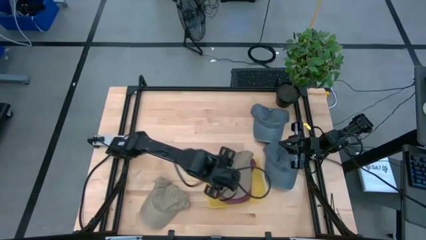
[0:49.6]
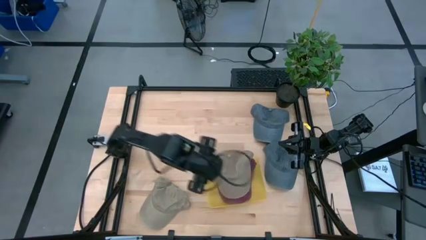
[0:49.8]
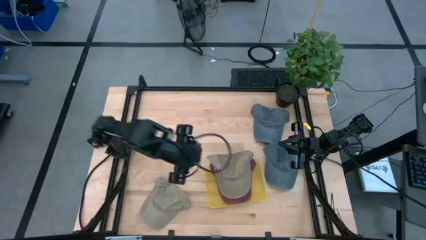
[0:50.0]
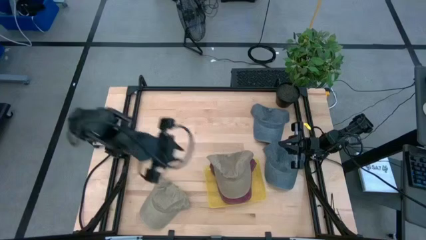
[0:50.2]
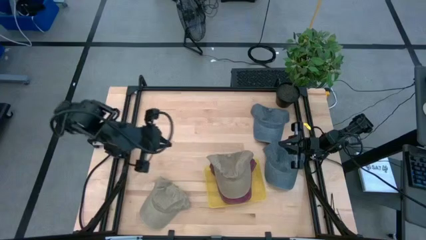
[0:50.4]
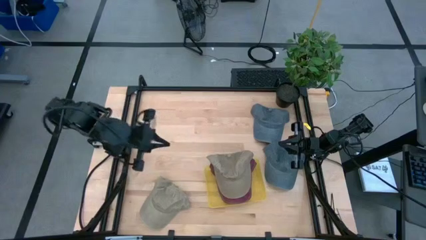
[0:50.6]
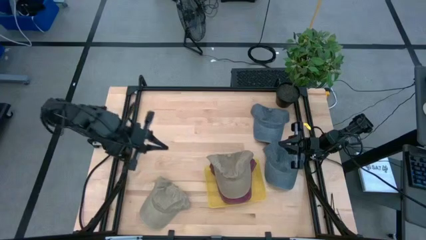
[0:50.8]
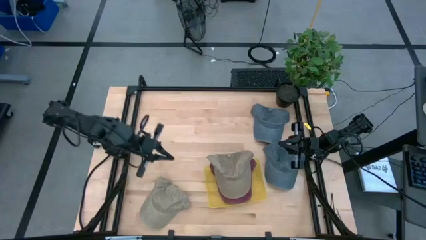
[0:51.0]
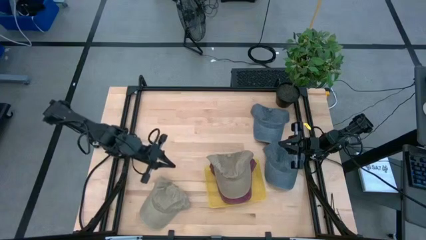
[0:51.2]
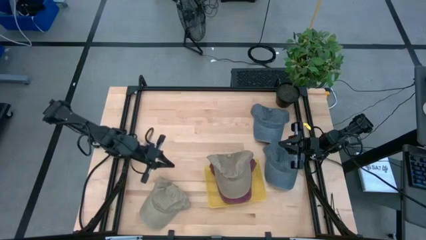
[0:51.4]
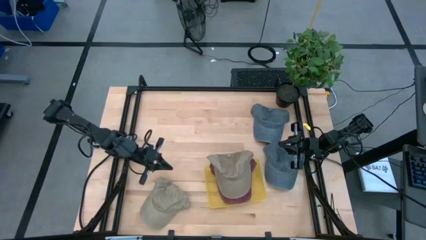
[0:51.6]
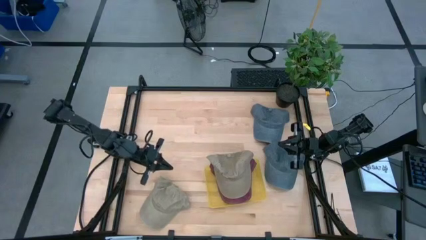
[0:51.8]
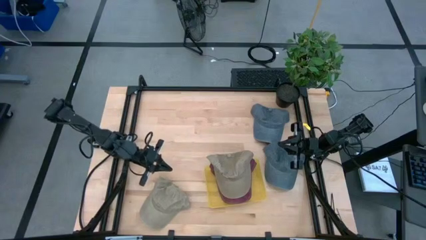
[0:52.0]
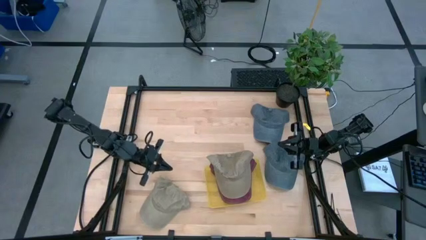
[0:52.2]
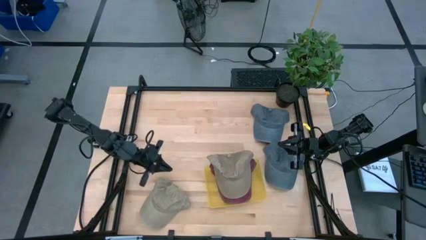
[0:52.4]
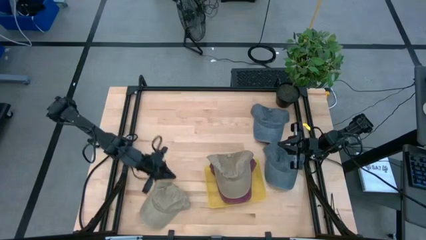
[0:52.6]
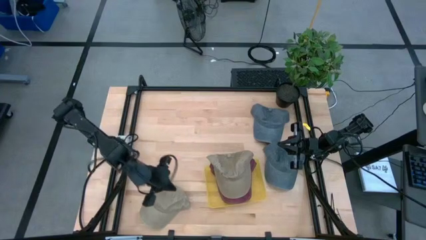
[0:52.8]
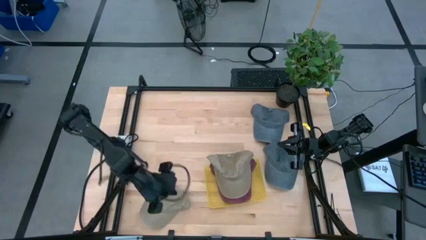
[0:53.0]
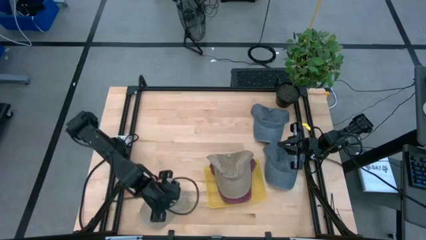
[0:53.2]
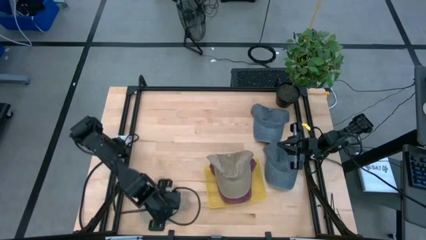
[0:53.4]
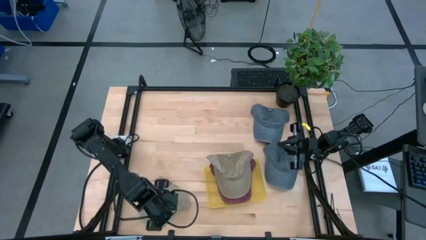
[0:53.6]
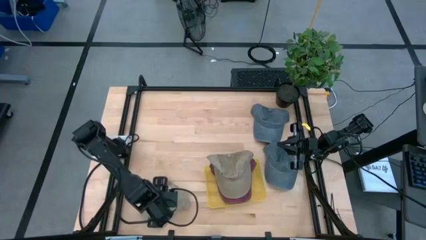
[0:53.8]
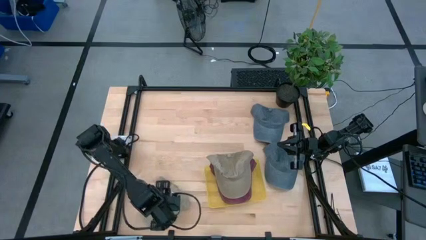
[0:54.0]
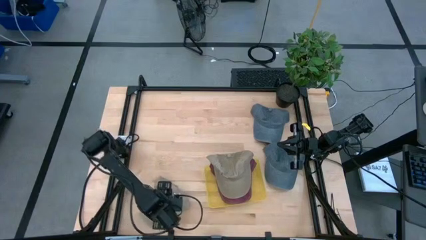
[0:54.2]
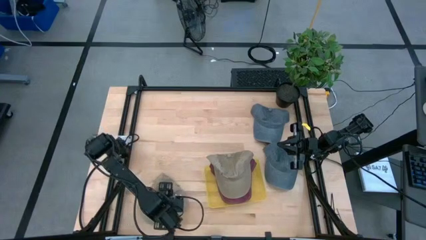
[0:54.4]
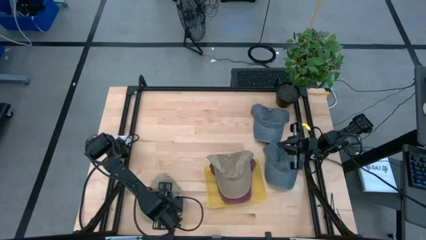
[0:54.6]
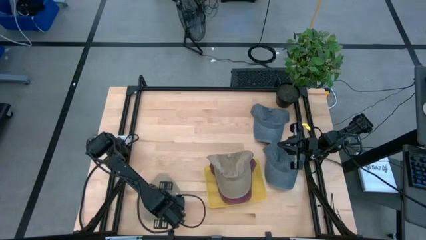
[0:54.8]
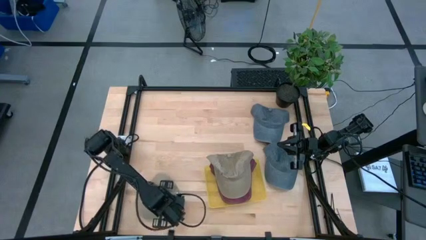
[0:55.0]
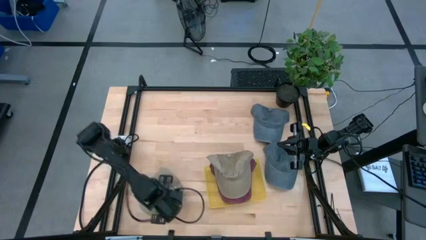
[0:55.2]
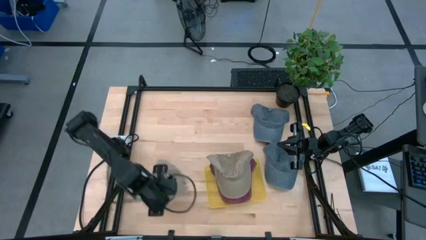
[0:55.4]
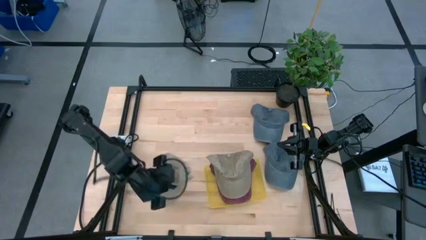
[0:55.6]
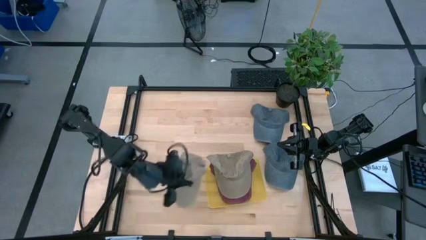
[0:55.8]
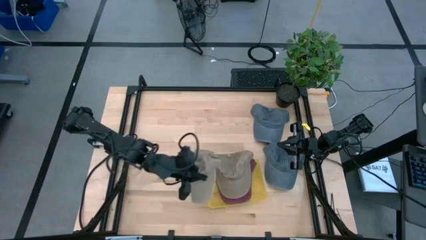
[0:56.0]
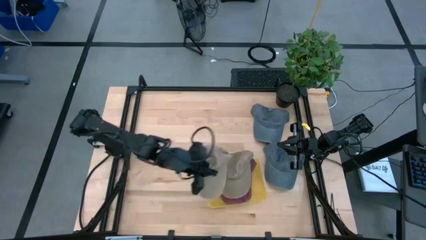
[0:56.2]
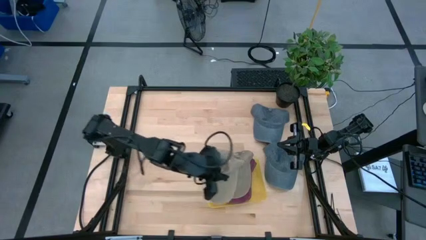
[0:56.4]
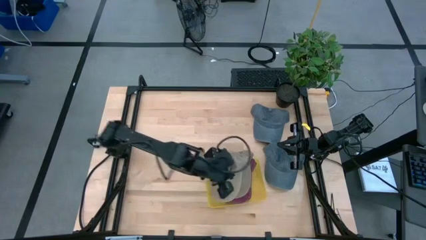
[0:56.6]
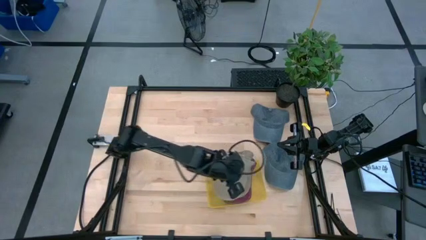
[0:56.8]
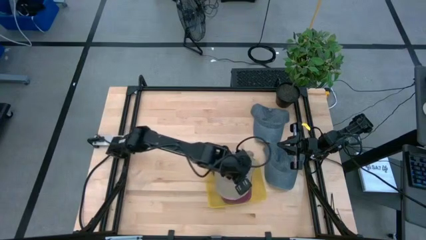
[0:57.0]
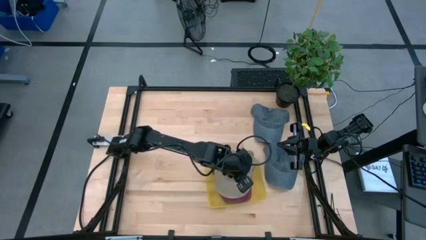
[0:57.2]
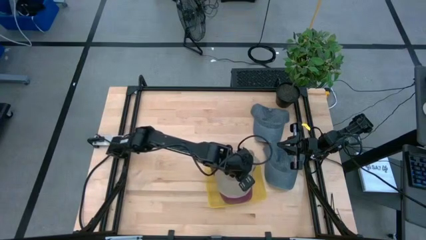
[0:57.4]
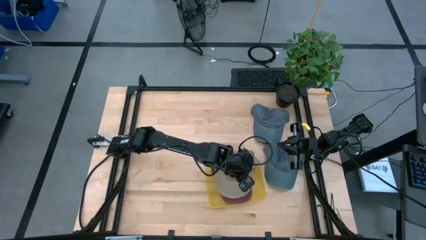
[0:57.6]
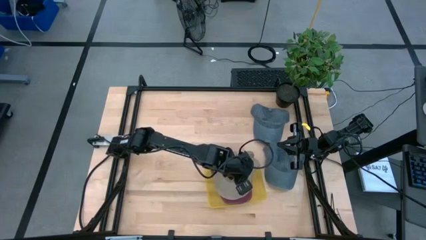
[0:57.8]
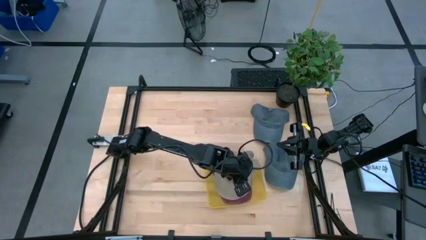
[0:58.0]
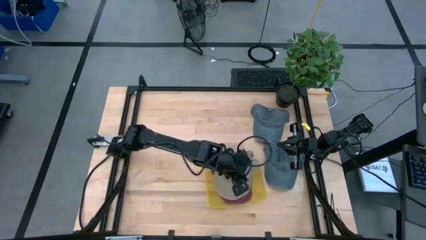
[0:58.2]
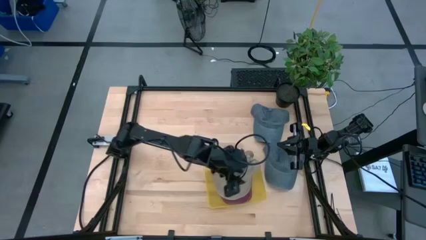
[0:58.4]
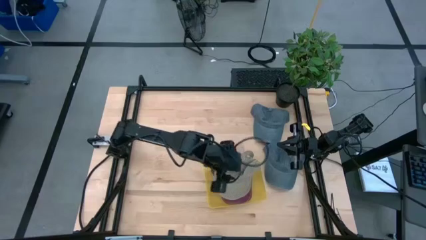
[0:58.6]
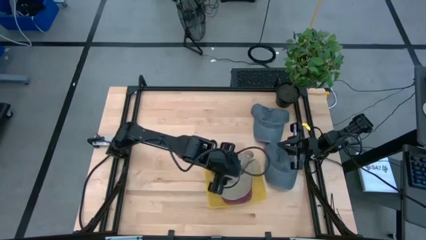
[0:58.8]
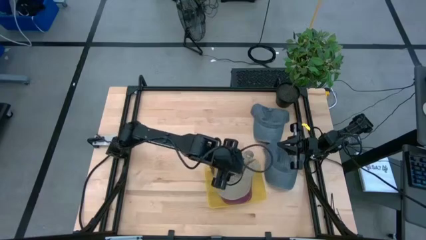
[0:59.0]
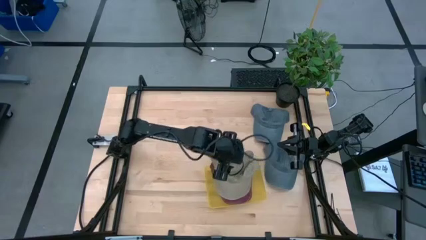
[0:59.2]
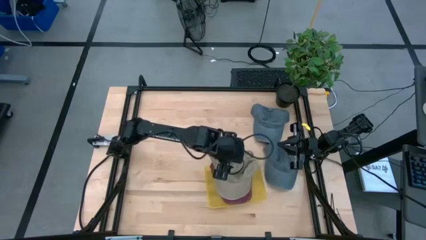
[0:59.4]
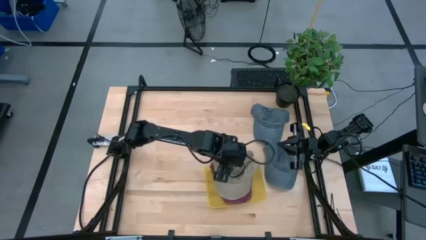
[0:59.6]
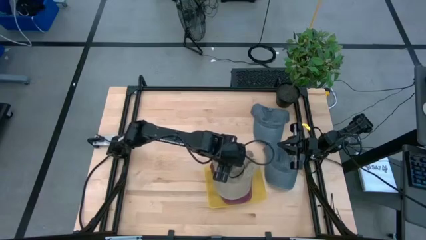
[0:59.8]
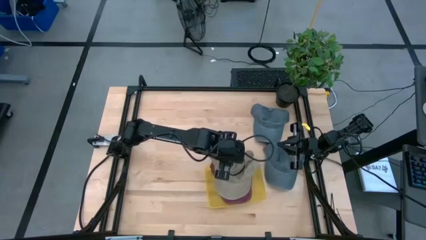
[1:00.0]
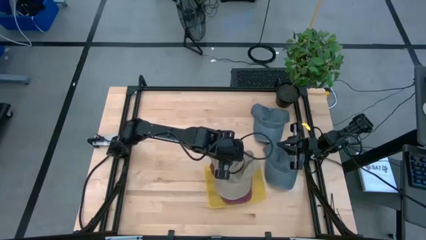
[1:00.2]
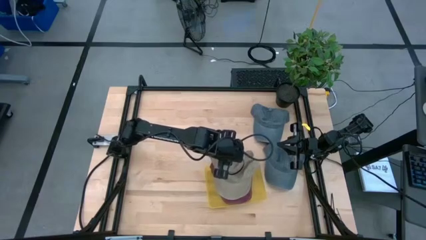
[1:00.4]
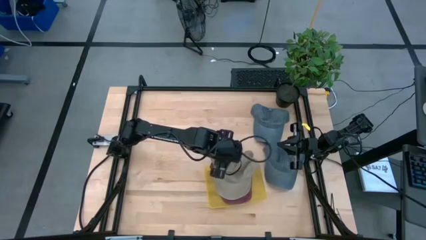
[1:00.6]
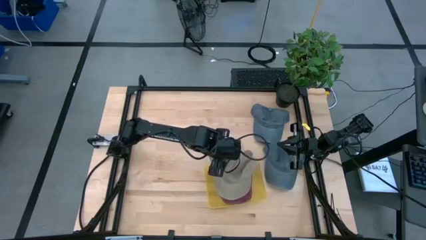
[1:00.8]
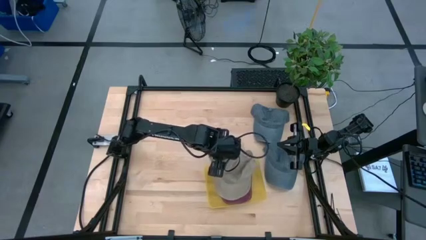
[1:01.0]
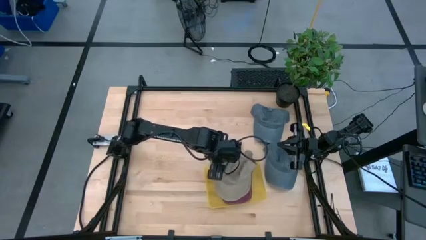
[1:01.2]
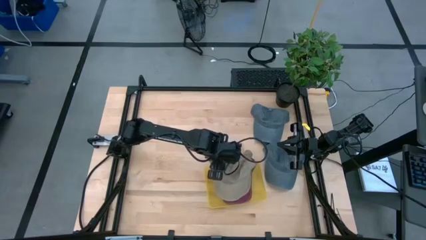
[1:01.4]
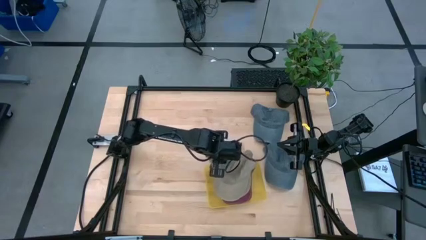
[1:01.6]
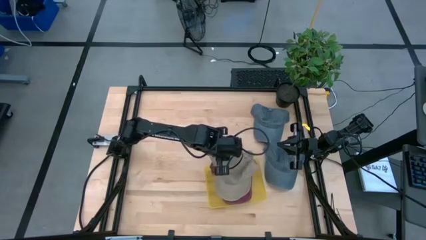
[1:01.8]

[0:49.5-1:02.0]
Task: Pick and place caps into container
Put the brown cap into the yellow container

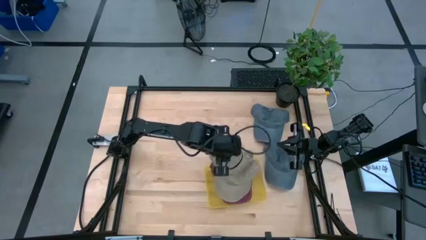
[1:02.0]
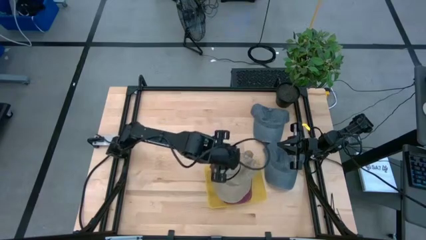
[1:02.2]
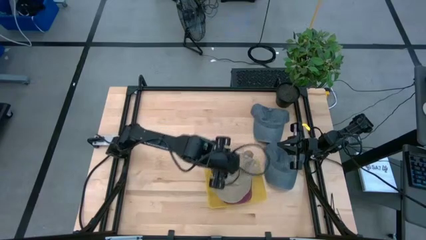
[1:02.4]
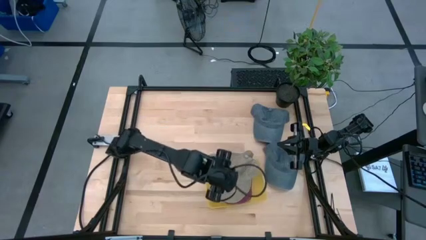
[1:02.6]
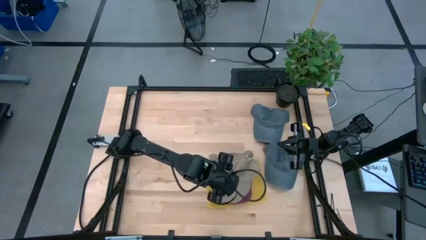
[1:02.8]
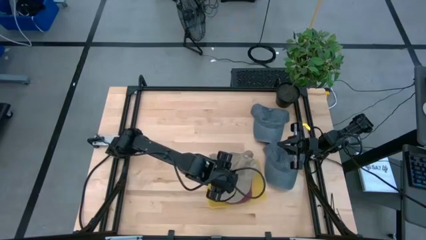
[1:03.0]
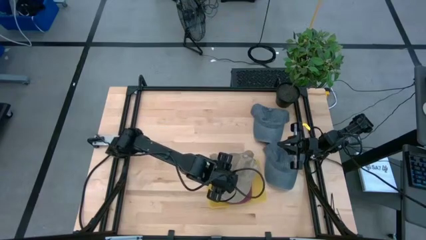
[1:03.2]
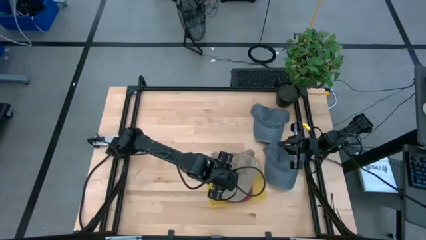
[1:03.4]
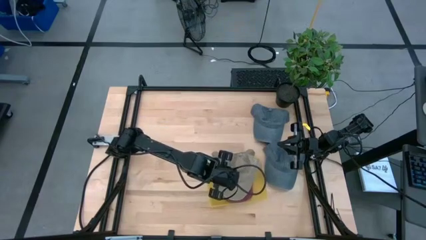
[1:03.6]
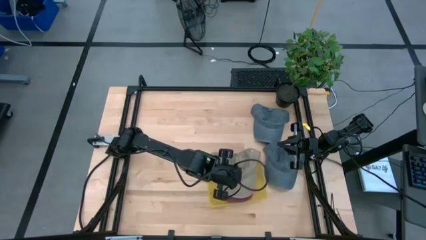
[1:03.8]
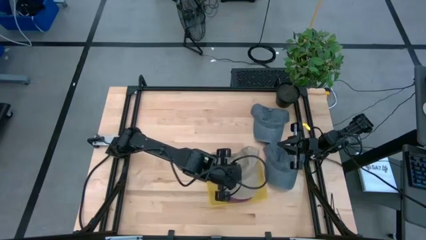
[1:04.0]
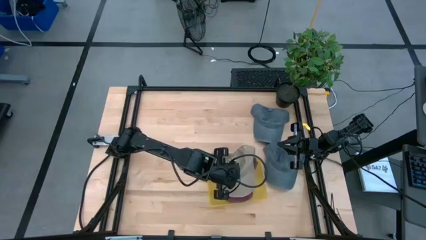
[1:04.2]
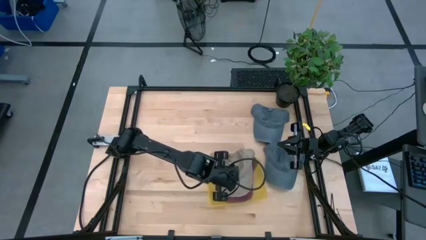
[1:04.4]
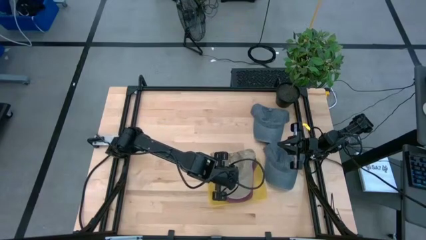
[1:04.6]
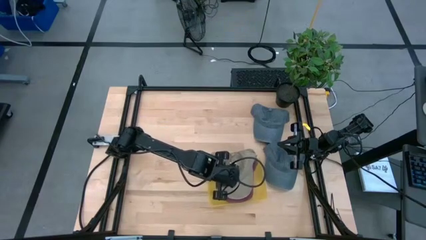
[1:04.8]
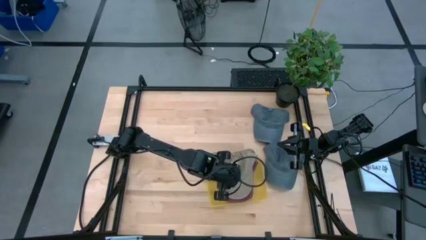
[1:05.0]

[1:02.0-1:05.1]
Put the brown cap into the yellow container

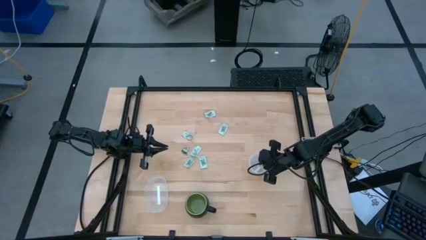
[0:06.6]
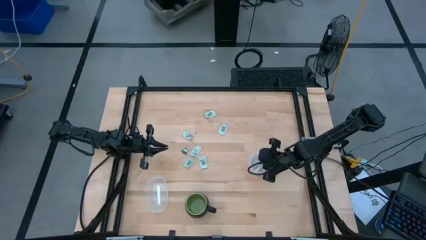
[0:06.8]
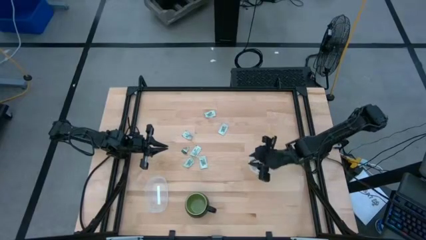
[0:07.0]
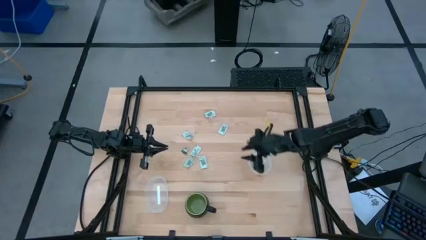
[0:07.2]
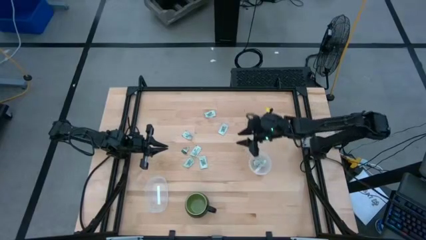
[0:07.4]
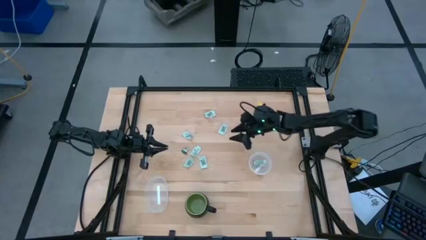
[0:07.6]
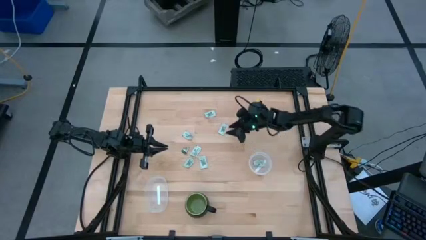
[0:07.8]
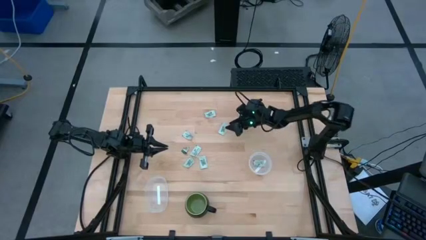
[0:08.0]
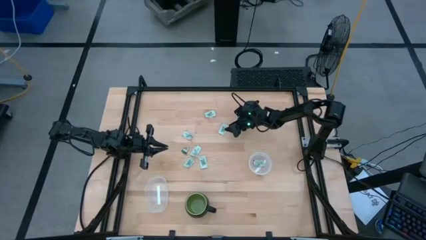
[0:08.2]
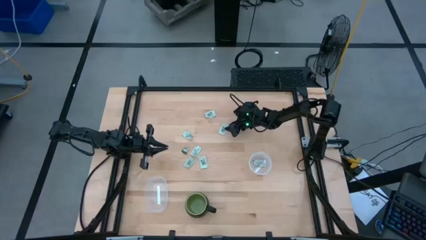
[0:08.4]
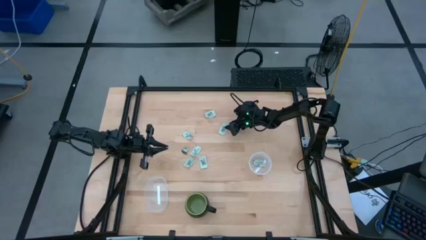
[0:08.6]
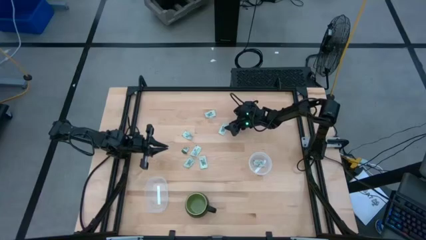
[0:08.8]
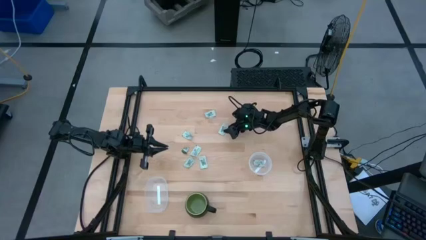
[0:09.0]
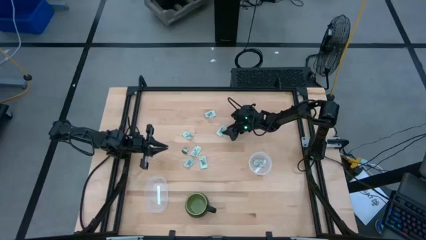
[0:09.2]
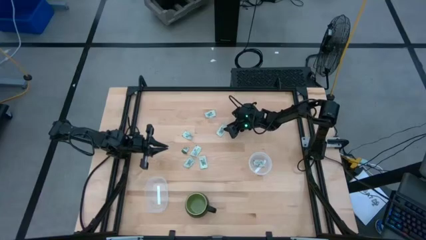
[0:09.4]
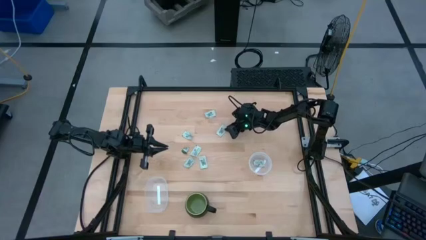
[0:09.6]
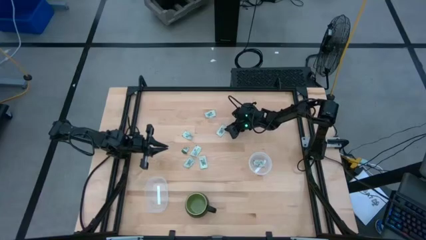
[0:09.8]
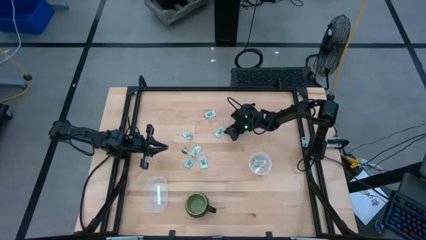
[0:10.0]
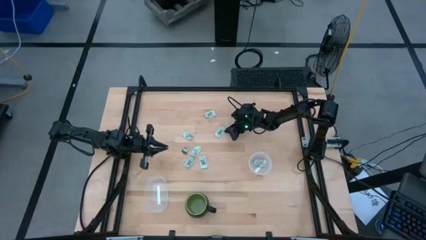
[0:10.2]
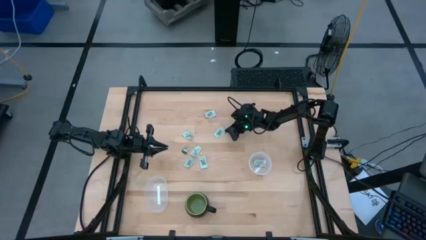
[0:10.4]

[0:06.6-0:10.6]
Task: Pick and place Stevia / Truvia into bins
Put the white stevia packet into the circular transparent container
